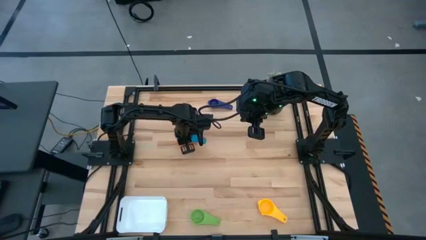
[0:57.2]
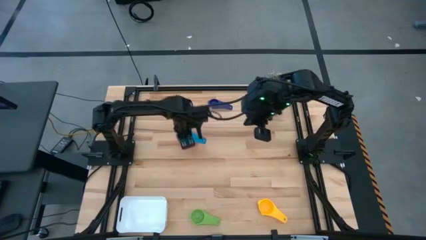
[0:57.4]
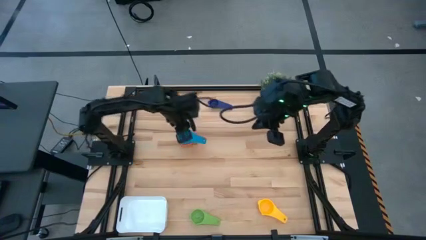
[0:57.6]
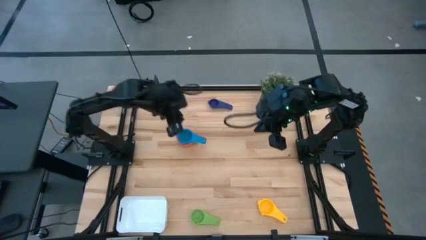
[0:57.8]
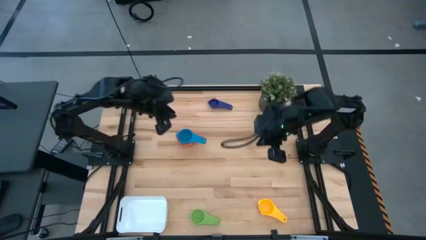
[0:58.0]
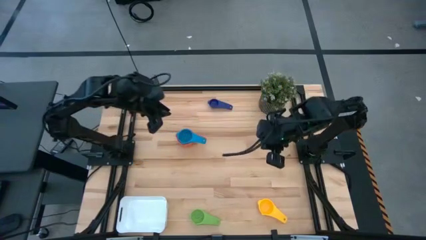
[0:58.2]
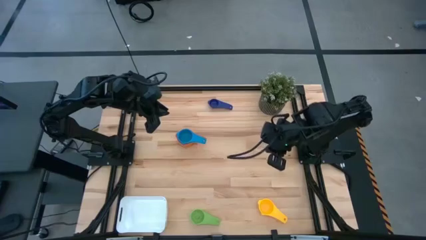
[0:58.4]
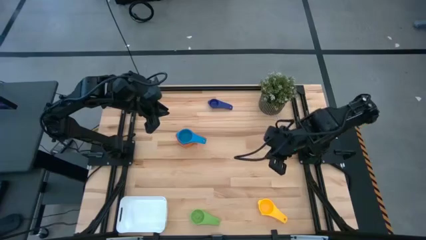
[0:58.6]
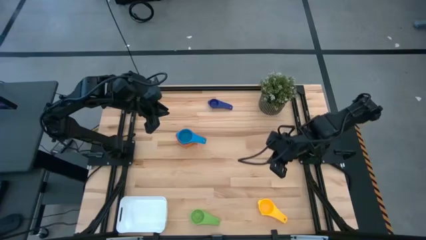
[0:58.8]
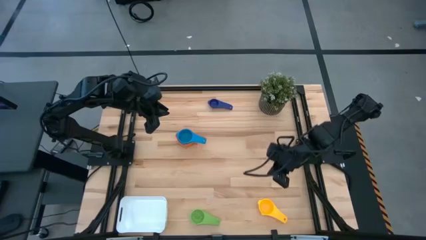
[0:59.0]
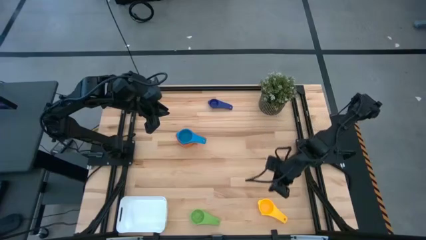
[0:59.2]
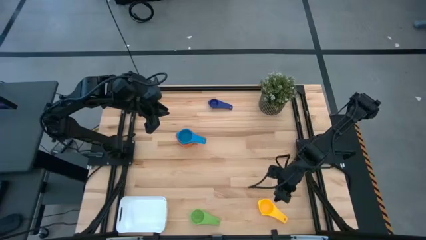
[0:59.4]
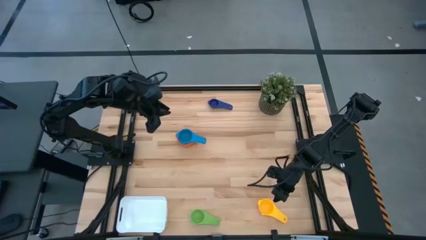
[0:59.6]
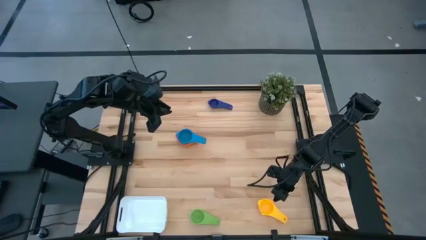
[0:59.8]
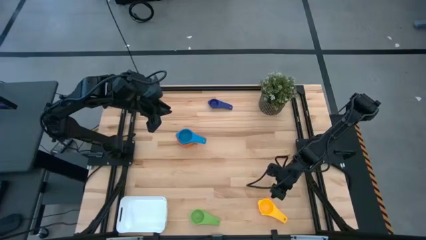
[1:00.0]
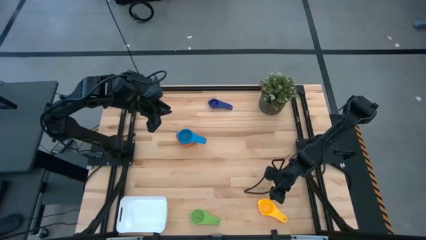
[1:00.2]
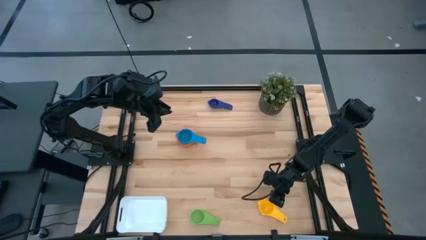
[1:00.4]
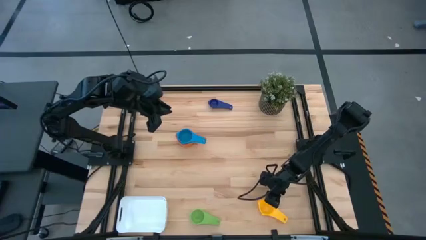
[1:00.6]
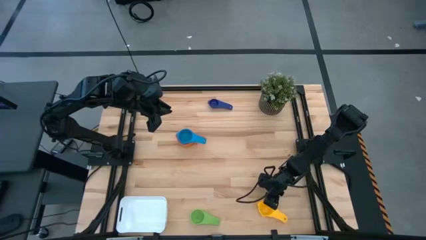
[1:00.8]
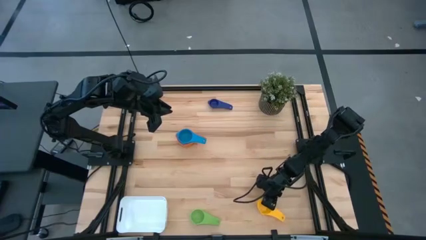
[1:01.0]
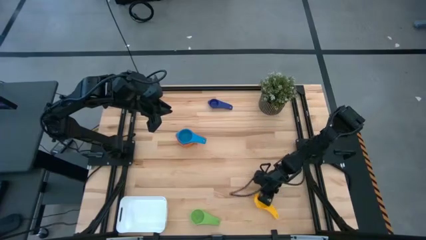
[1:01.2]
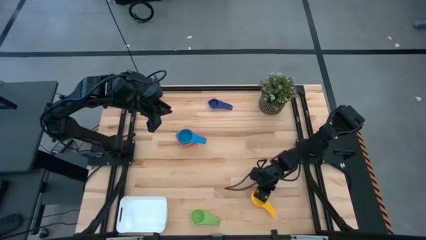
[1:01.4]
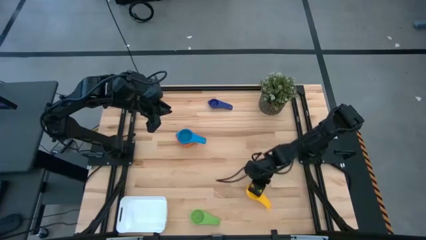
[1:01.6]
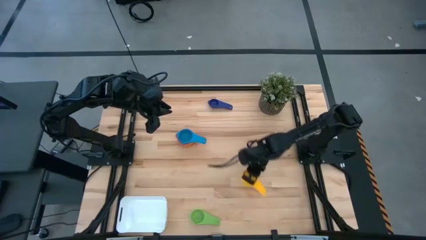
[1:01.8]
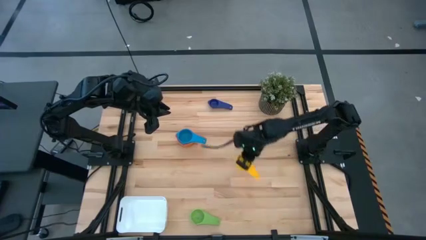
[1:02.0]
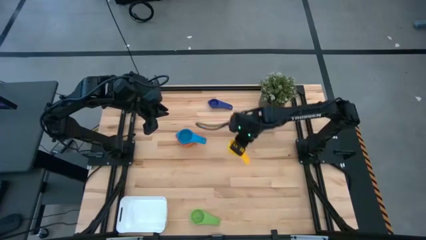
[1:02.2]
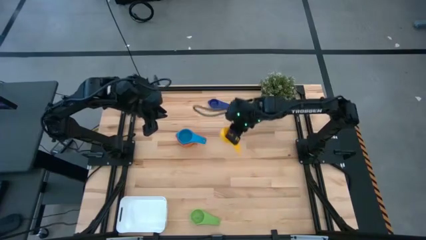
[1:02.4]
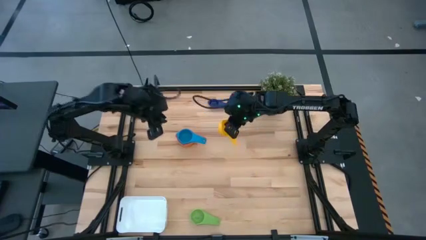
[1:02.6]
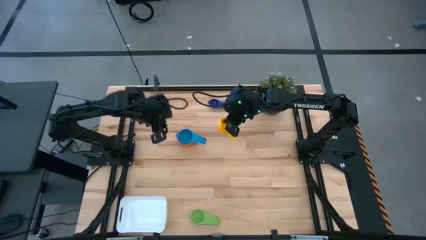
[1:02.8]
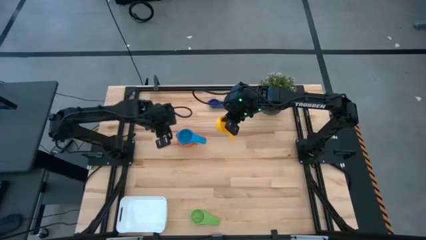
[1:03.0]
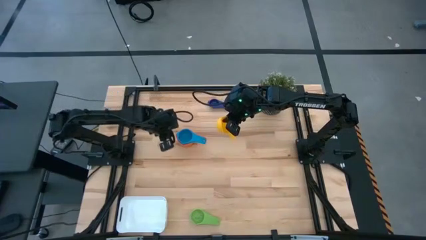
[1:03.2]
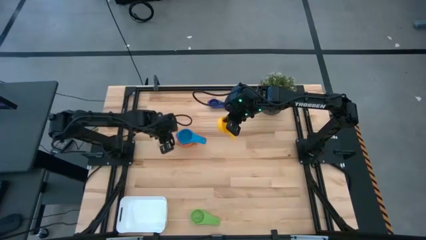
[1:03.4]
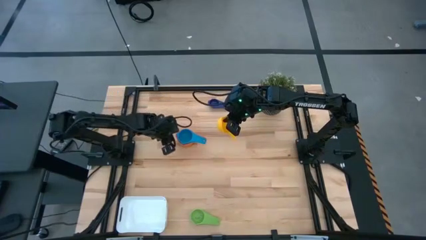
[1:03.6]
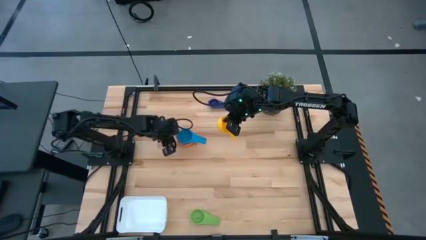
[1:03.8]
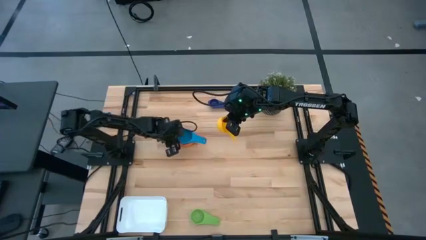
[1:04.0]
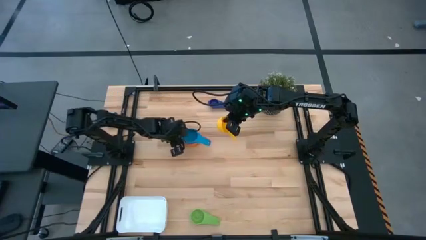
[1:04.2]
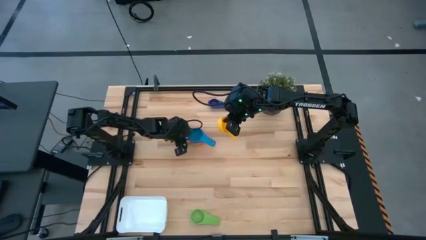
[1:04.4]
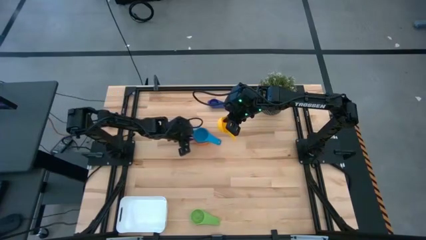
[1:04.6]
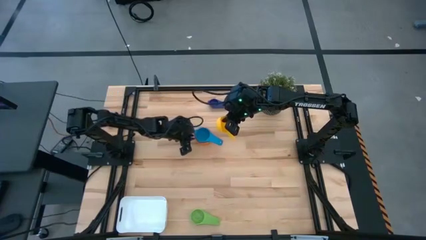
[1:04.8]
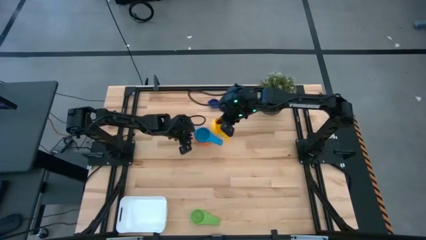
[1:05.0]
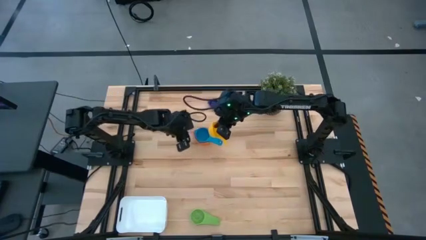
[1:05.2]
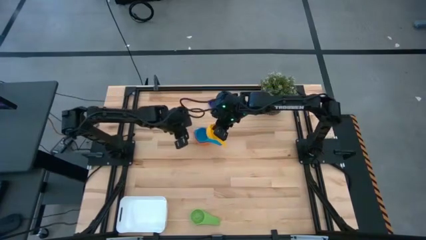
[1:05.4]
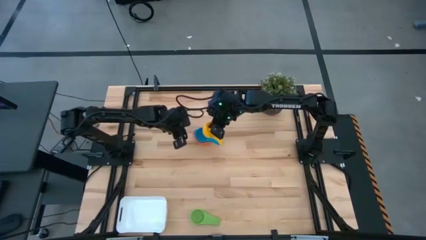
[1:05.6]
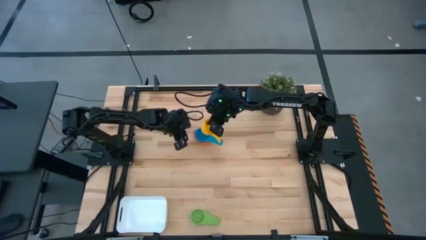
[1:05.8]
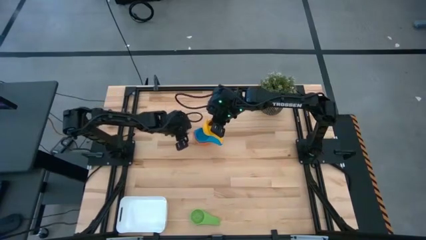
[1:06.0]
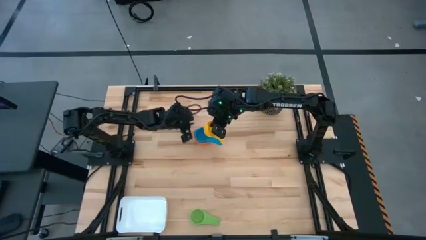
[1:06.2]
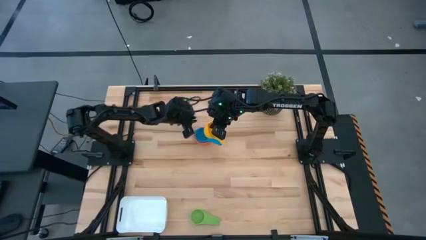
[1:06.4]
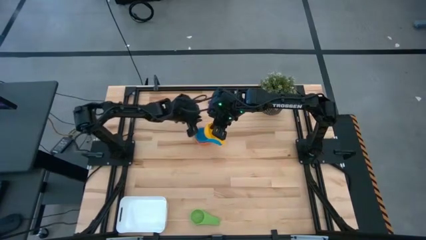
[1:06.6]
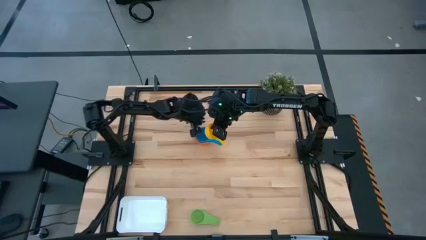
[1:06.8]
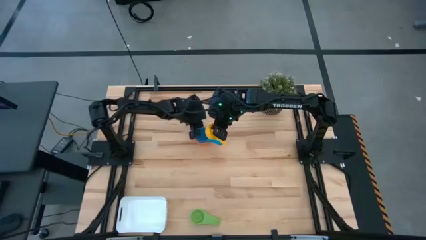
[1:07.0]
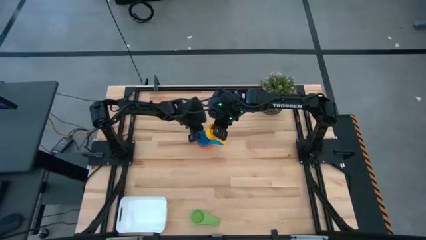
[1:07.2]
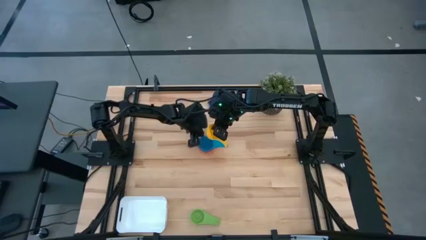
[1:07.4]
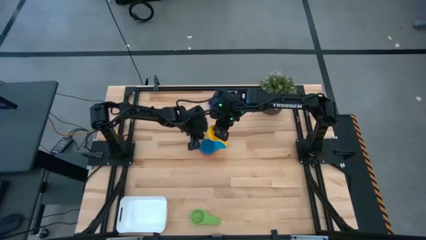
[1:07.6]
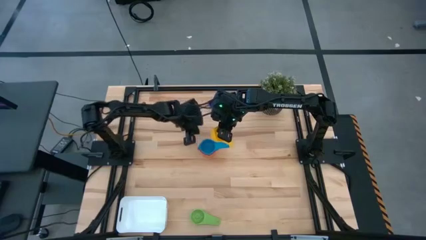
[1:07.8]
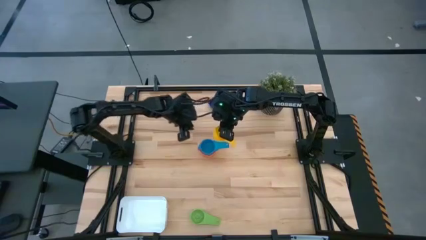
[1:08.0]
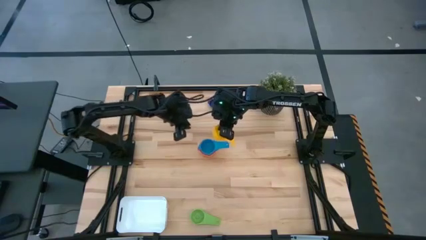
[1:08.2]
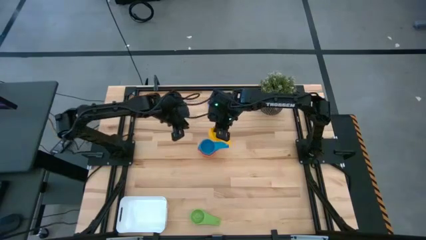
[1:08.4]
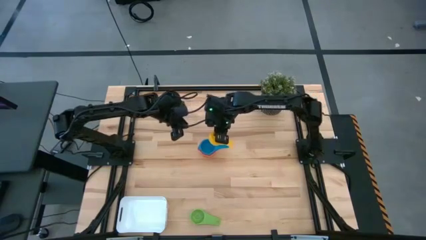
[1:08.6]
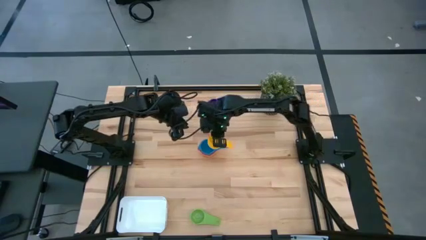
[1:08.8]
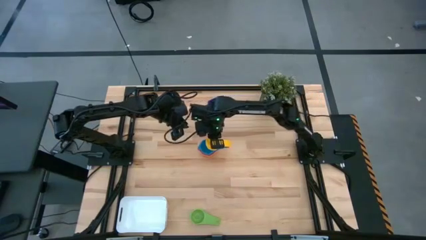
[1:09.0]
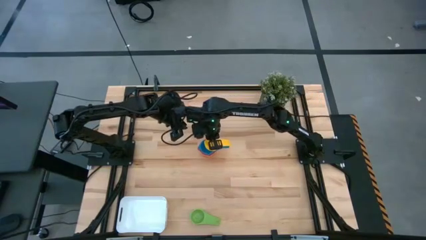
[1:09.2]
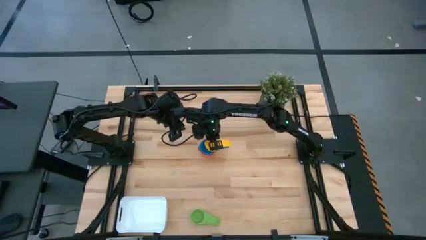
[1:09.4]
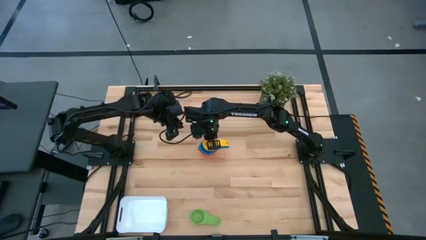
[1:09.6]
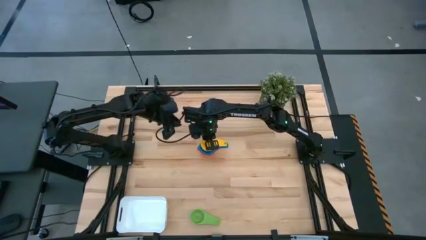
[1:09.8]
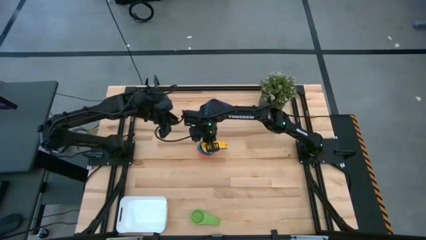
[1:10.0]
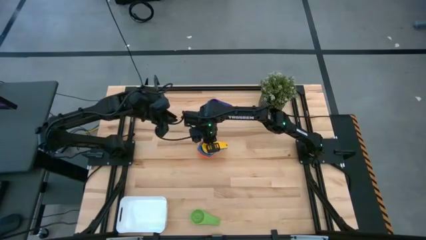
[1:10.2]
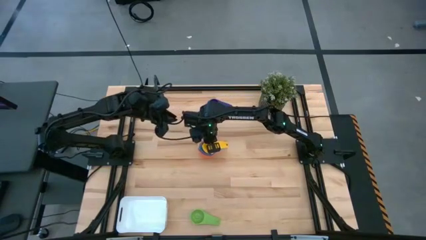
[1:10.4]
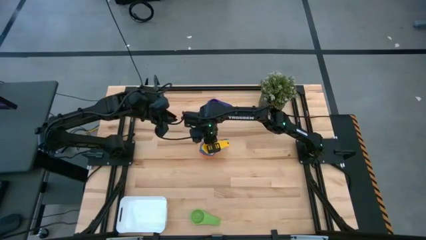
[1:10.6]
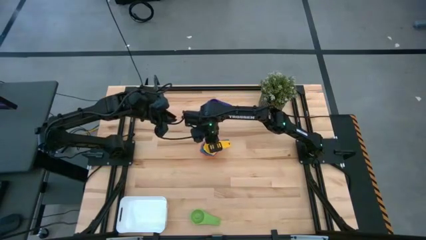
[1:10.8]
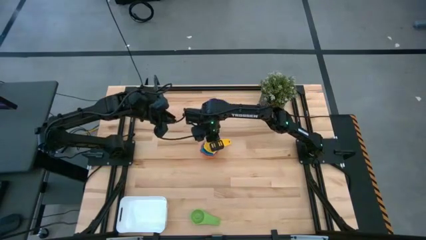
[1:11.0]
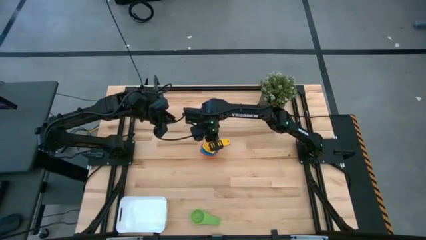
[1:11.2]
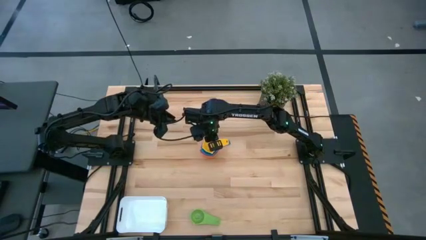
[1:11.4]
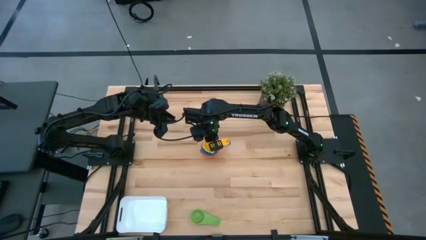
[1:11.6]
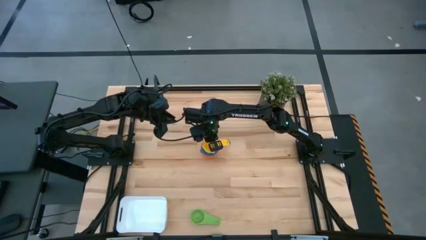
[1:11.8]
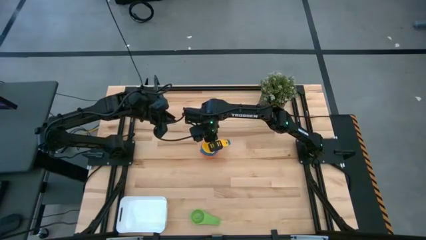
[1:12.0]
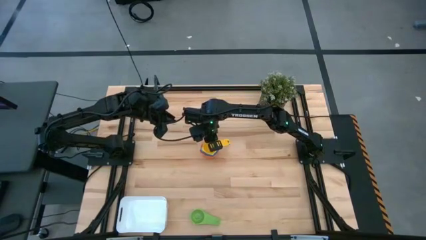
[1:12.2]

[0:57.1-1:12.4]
Task: Nest measuring cups in basket
Stack the yellow measuring cup into the light blue measuring cup

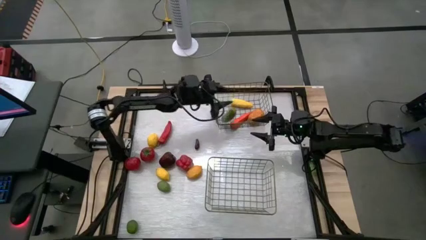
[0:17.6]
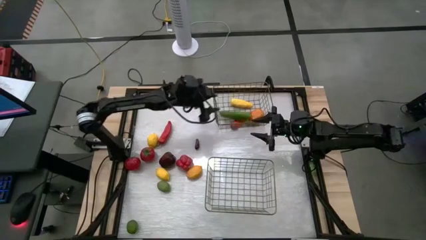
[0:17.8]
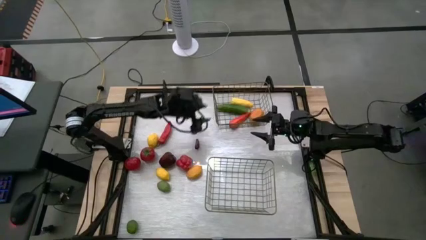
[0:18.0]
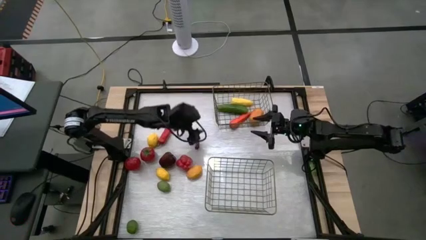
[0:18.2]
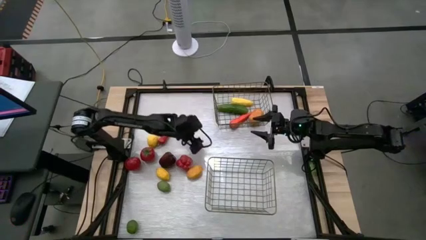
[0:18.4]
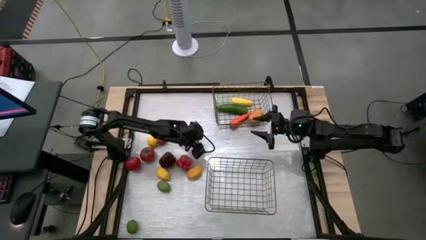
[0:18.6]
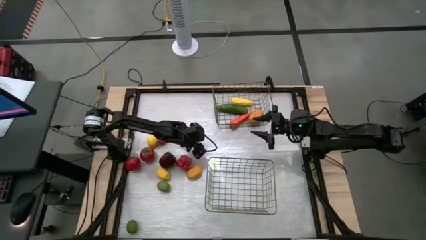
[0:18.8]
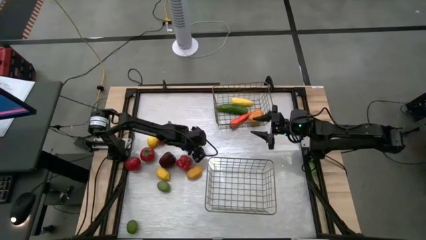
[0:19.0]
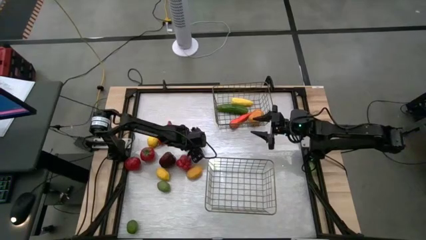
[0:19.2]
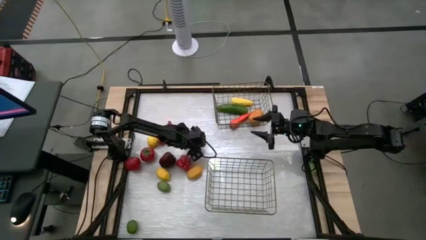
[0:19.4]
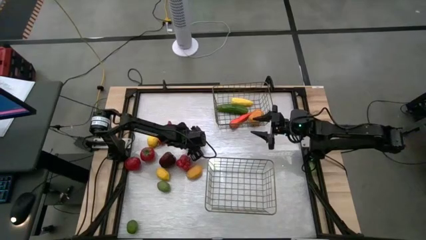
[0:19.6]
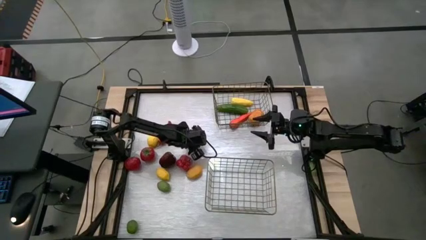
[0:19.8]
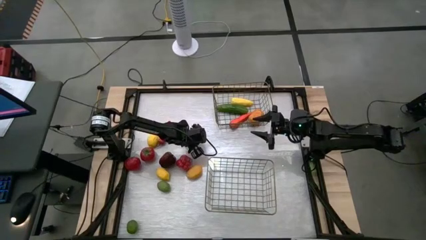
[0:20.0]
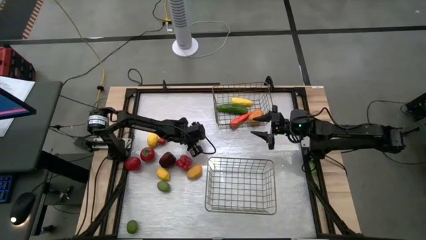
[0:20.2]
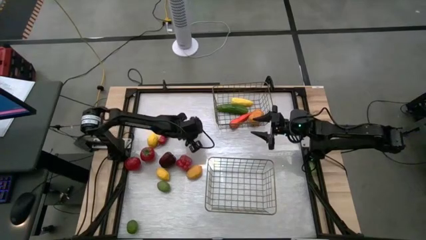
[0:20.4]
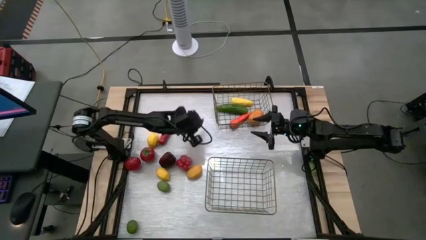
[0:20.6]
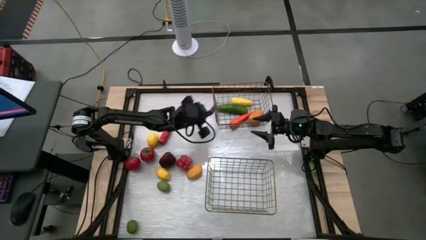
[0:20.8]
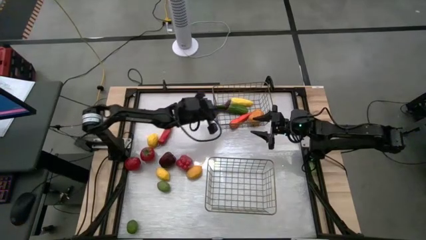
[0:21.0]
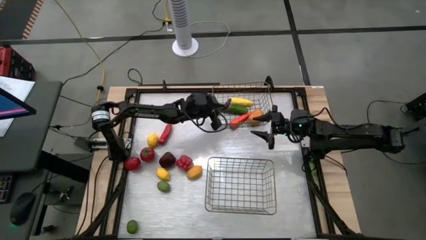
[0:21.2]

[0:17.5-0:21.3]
Task: Sort produce into baskets
Put the violet egg plant into the top wire basket
